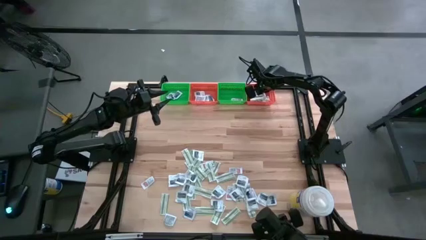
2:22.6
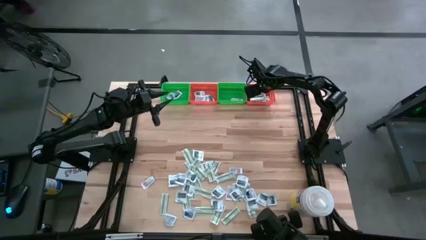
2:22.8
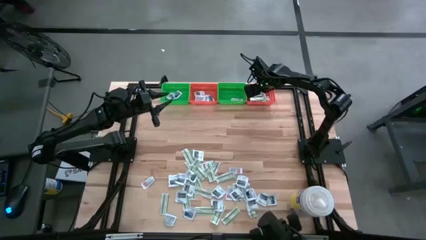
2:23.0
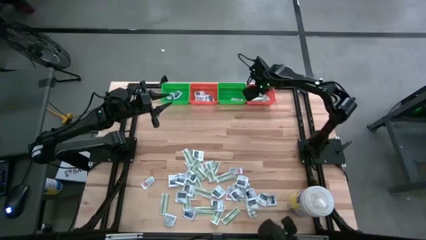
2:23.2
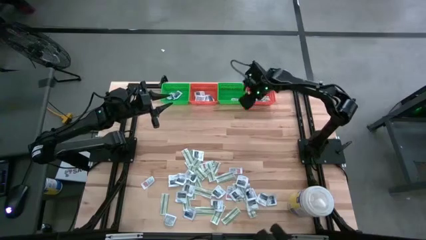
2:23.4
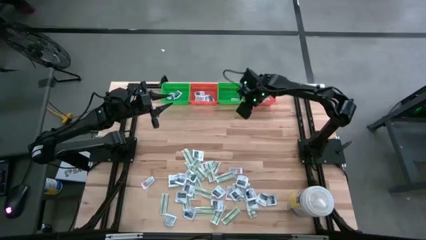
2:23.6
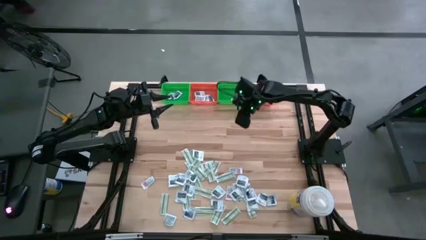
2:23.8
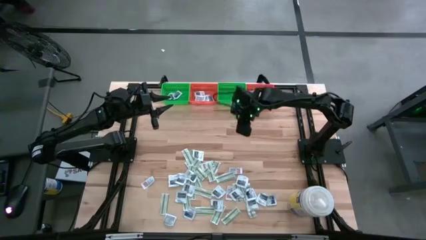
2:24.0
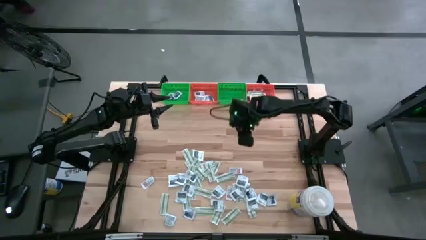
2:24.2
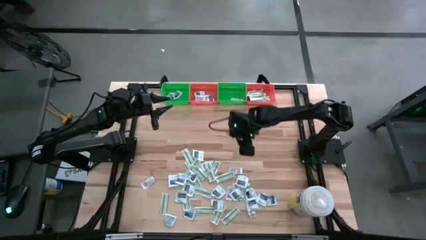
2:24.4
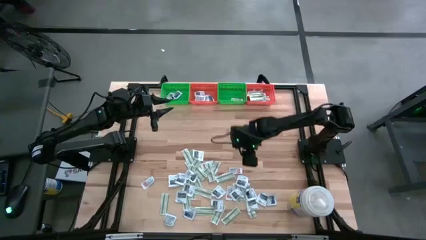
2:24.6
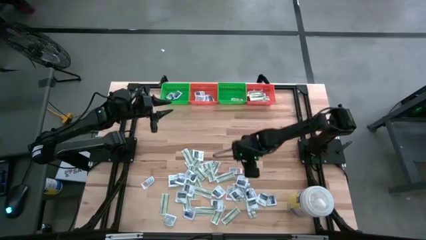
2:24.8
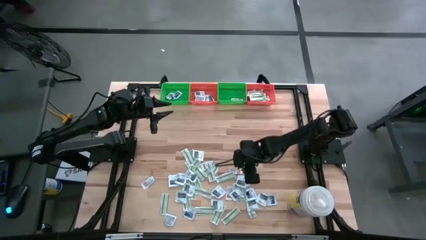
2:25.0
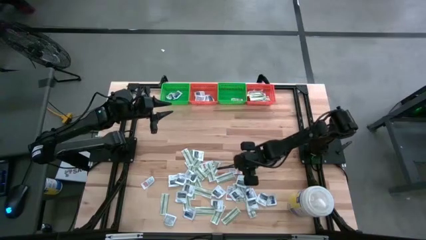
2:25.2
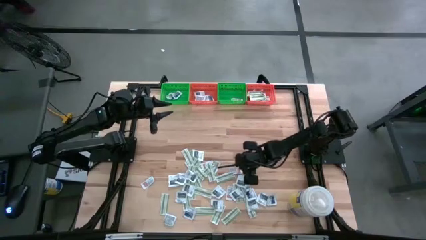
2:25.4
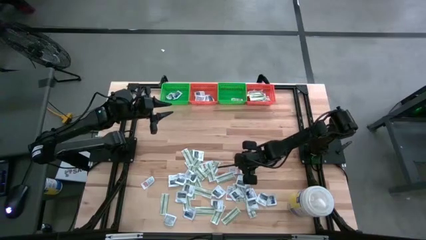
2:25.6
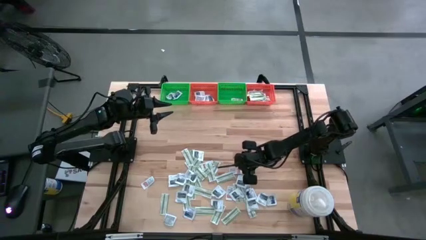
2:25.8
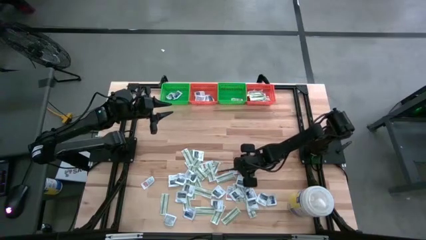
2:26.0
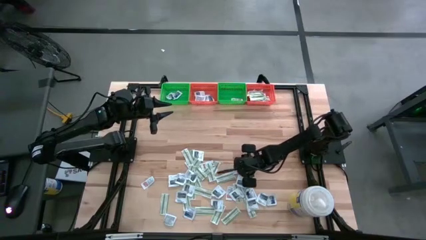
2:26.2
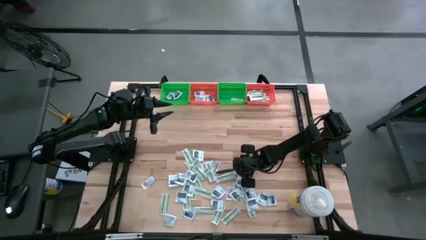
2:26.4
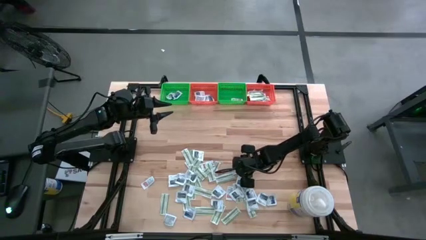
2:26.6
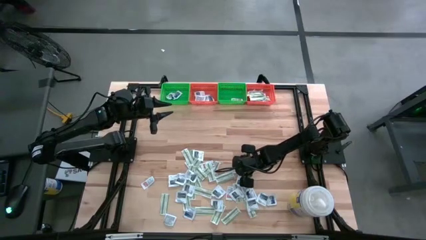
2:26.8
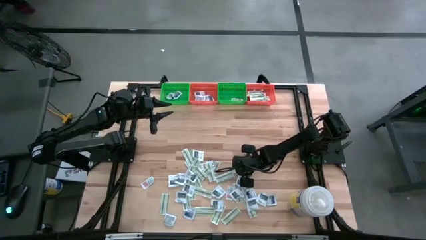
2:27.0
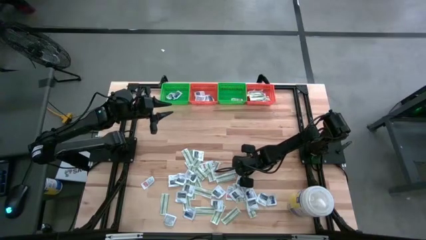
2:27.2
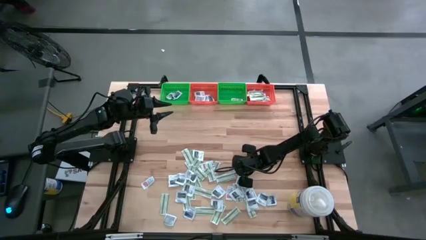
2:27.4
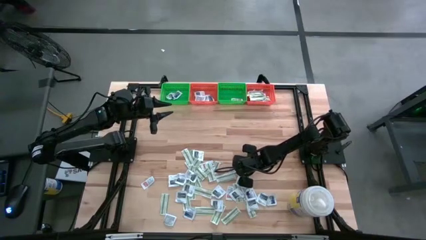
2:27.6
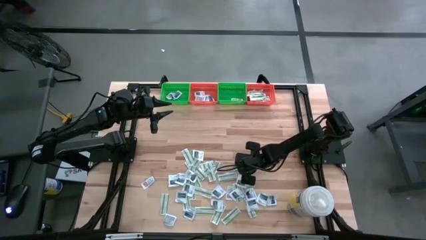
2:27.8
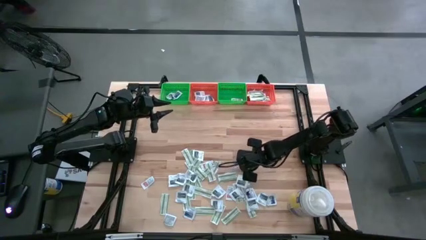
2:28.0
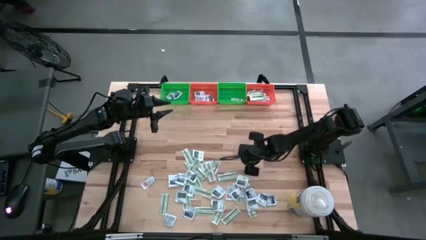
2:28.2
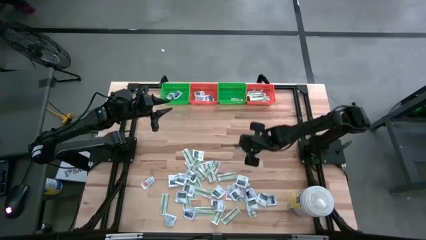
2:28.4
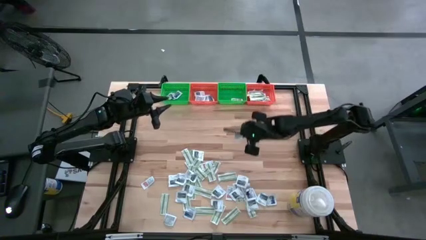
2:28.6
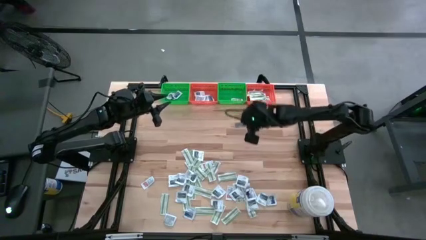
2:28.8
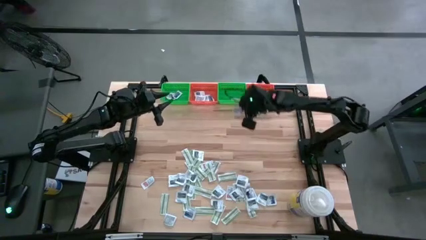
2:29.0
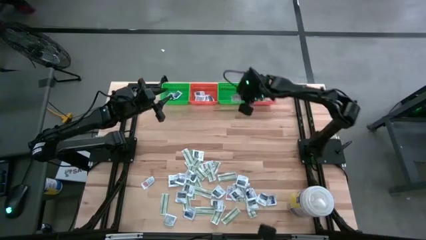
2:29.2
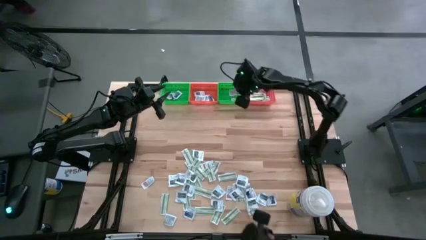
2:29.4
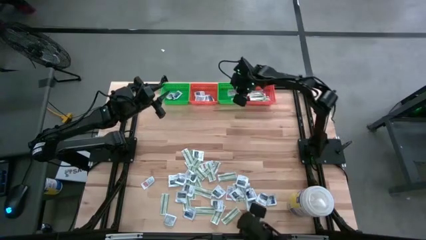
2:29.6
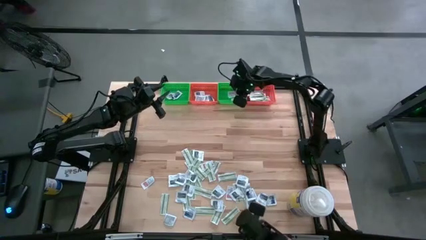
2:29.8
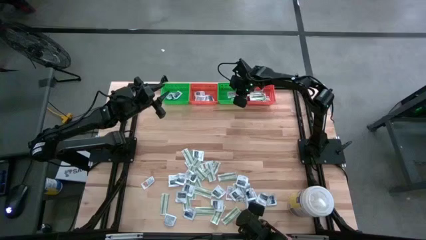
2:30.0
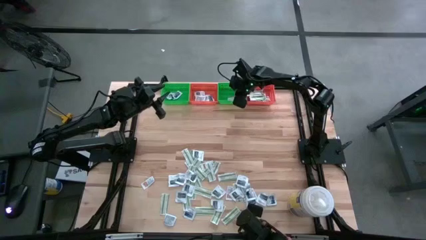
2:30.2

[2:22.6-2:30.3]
Task: Pick & Place First Aid Supplies
Put the orange ointment pack in the right green bin

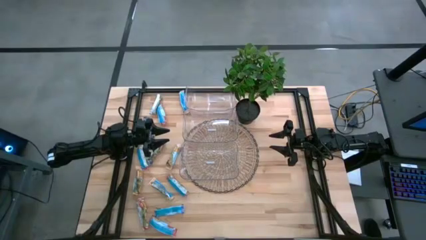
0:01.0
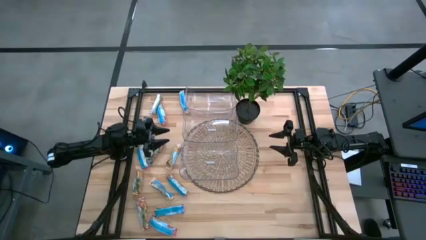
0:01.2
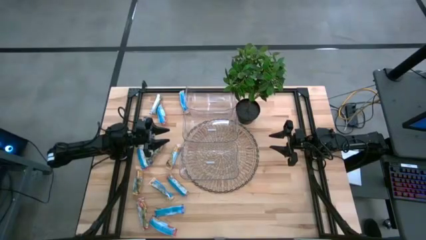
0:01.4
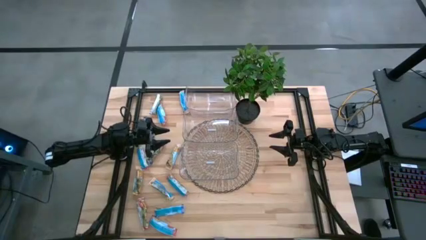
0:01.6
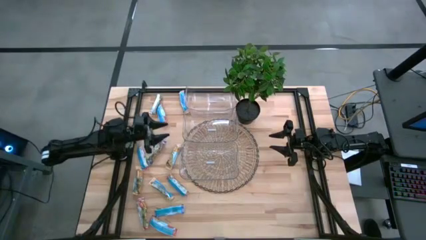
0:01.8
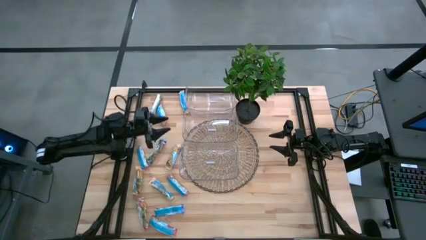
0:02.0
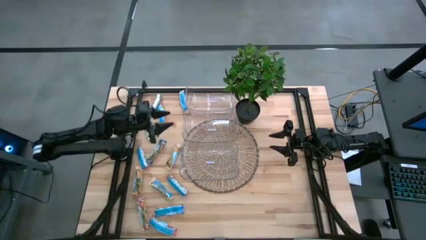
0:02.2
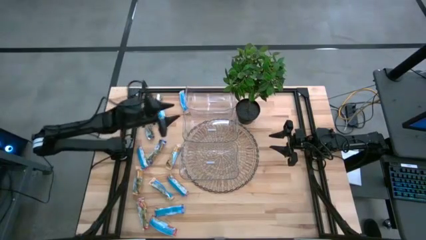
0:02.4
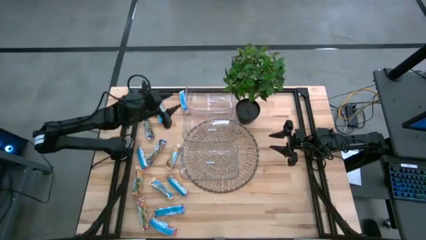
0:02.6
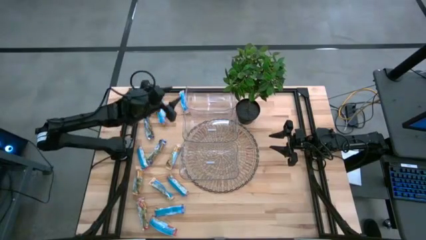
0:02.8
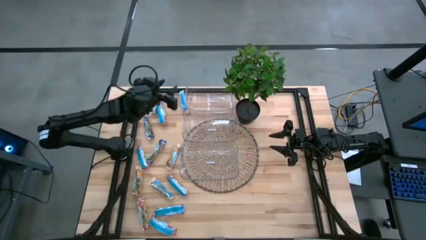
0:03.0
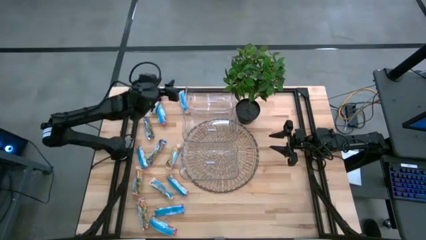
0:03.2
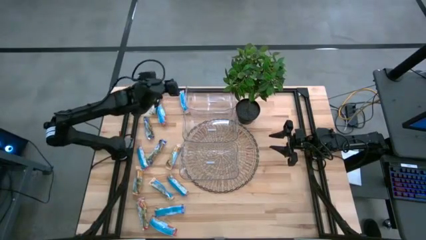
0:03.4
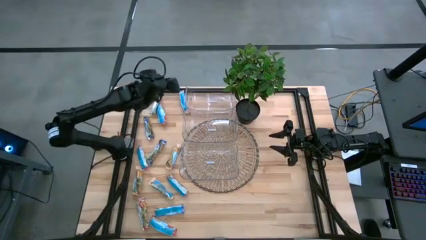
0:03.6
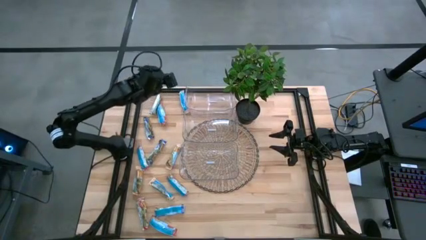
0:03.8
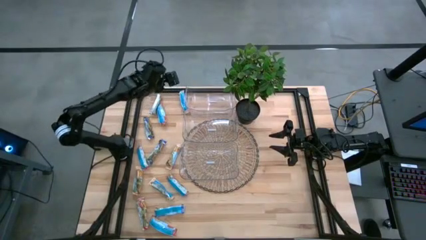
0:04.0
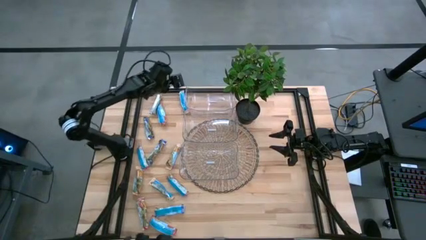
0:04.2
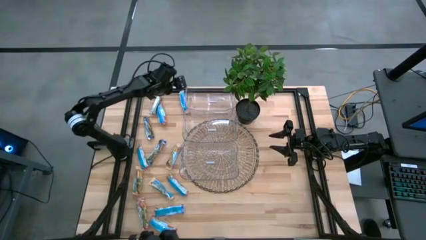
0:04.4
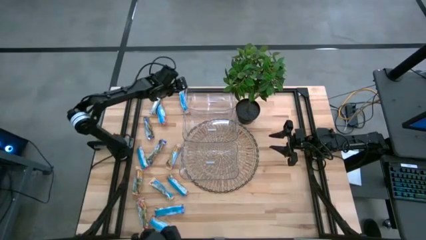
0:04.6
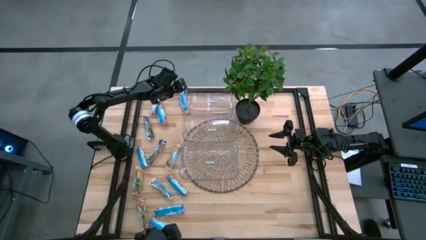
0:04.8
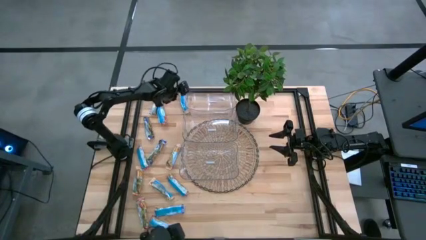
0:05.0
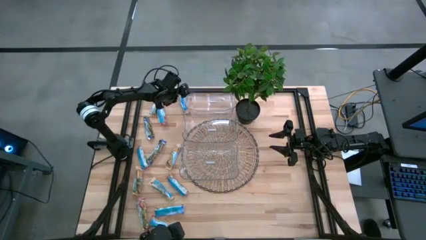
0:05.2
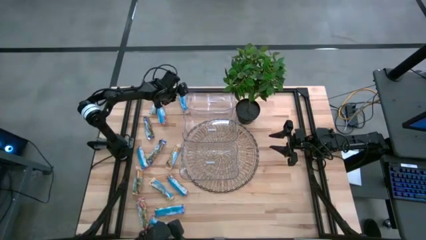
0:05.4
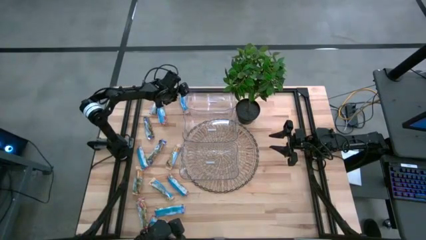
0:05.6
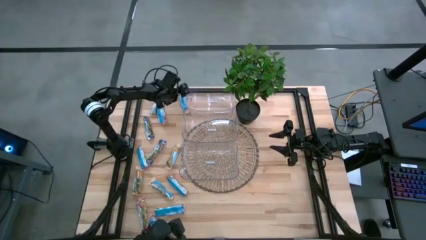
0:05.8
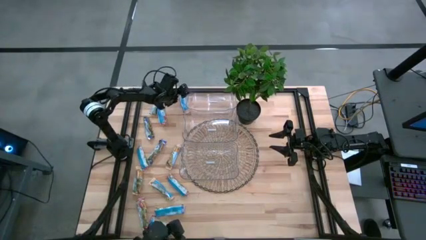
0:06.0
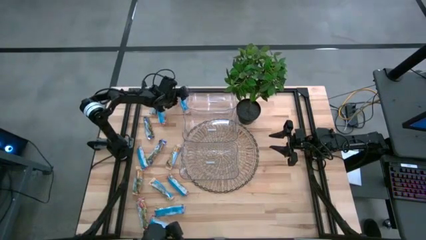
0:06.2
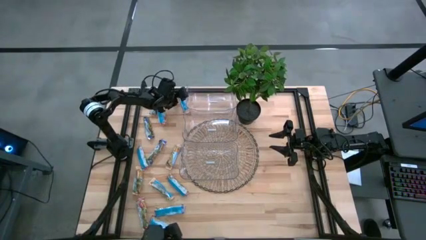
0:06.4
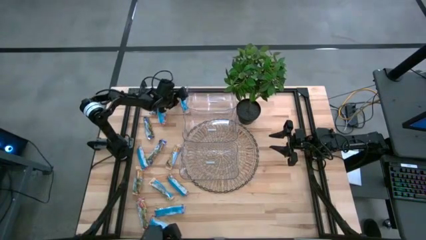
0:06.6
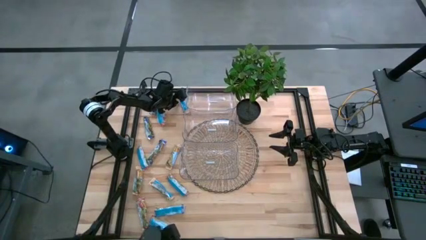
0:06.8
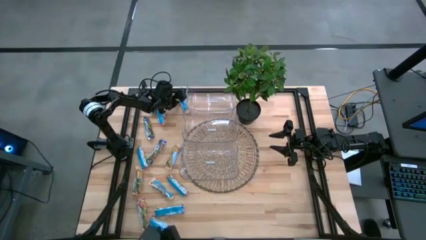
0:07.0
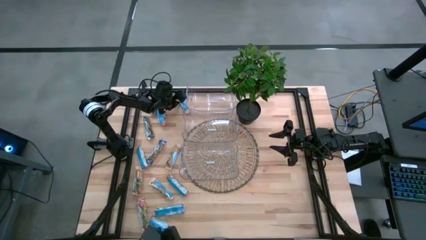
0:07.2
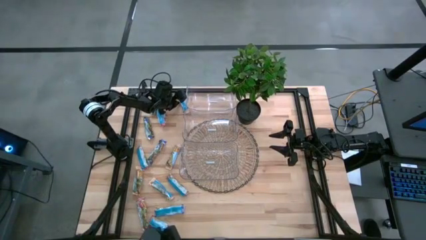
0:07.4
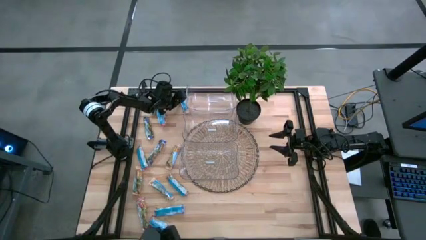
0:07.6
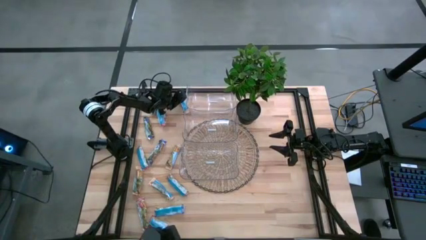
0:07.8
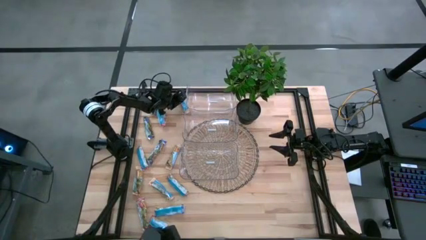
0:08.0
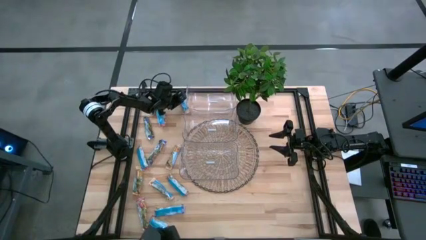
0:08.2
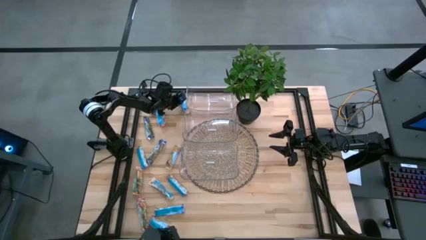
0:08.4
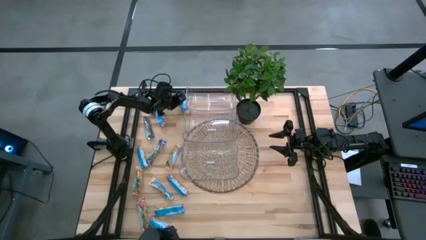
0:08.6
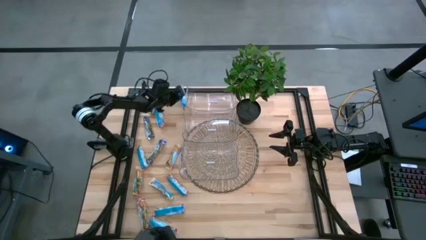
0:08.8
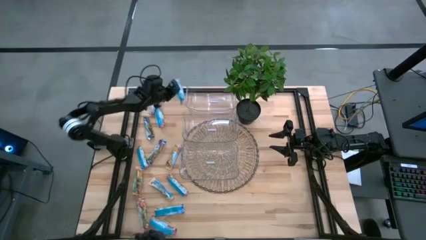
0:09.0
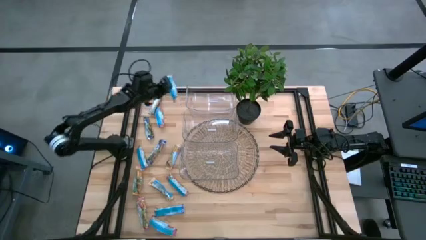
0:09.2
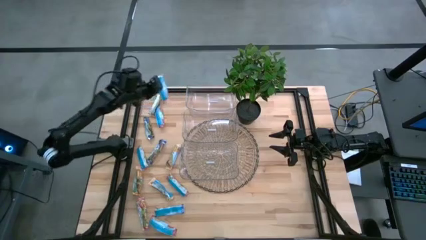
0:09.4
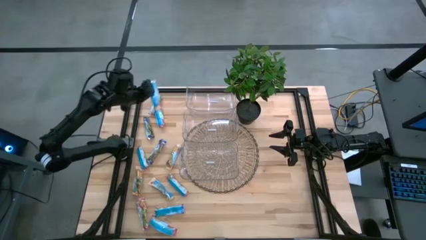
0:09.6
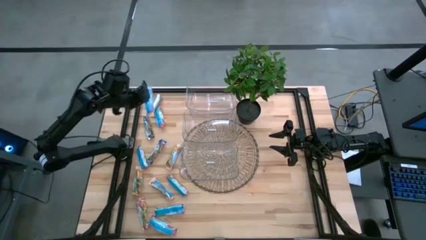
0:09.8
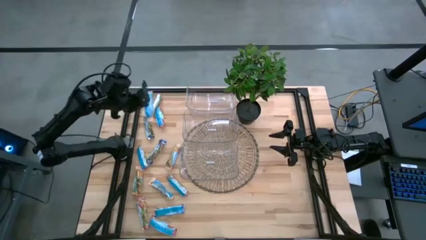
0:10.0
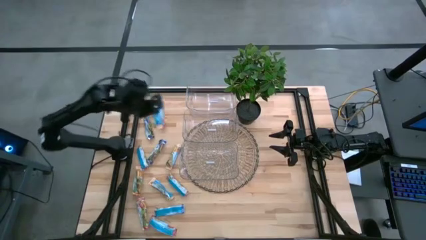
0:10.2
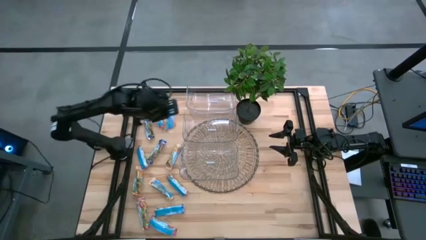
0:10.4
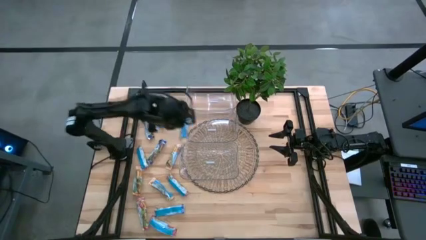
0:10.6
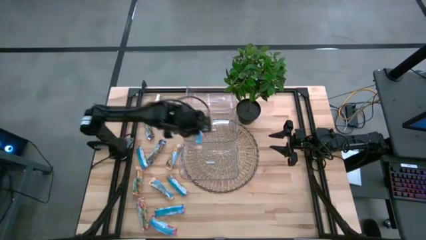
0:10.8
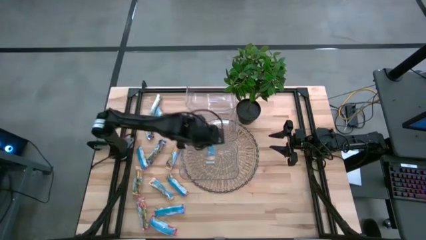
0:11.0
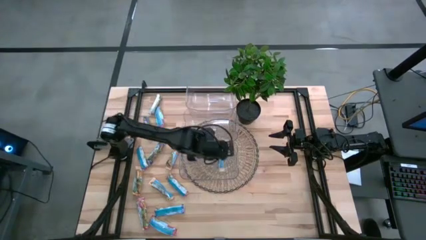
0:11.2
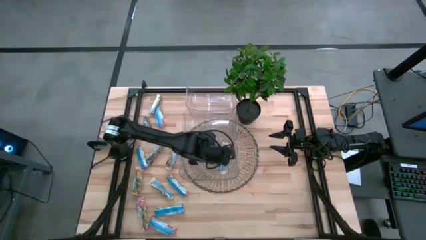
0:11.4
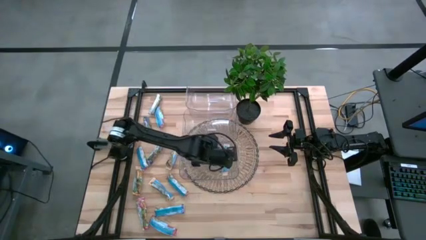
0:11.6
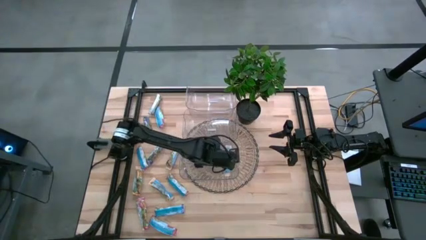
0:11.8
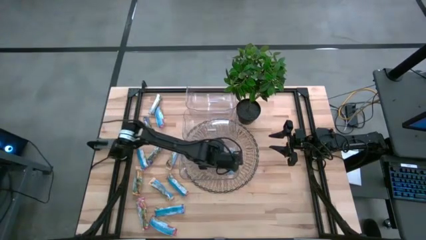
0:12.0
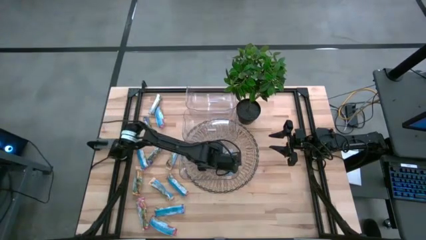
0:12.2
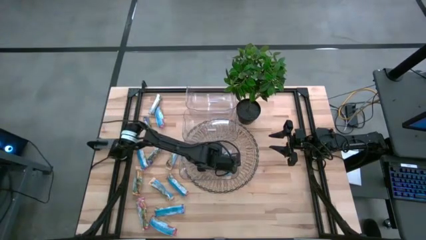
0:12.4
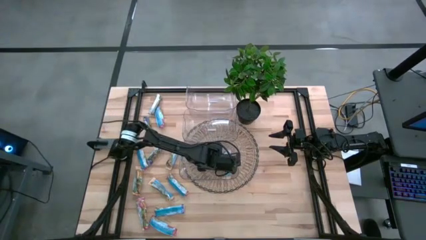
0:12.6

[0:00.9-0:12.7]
Task: Pick and place Granola Bars by type
Put the yellow granola bar into the bottom transparent bin
